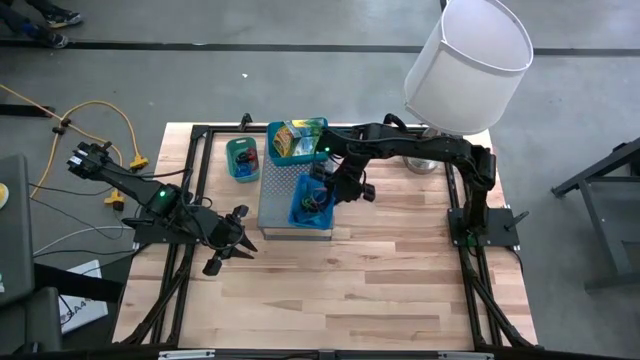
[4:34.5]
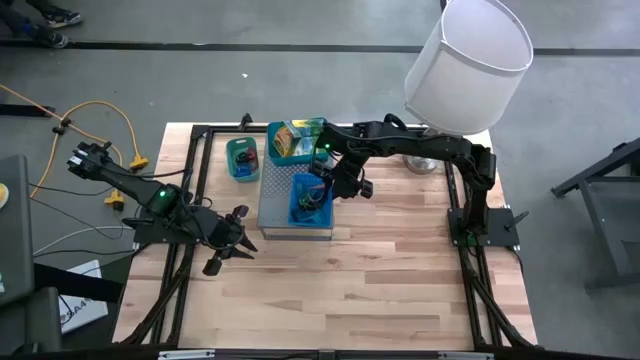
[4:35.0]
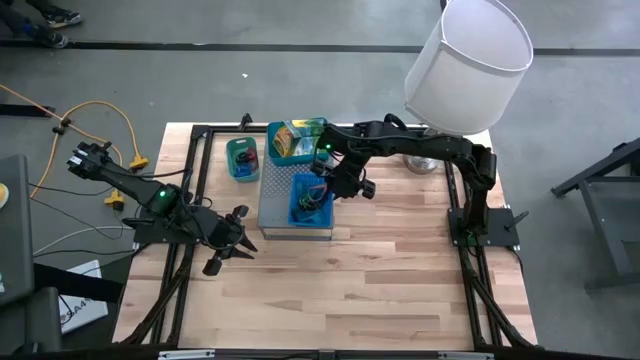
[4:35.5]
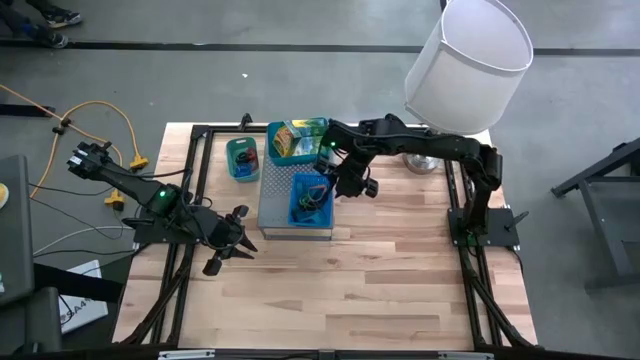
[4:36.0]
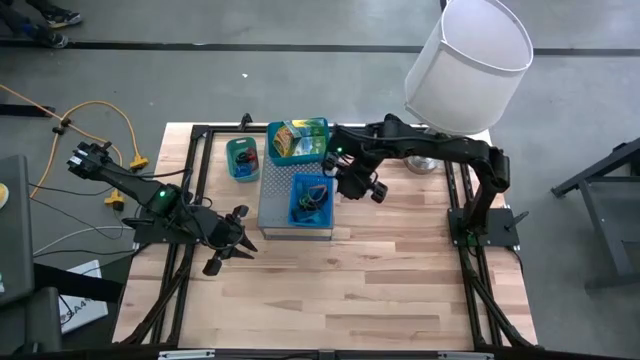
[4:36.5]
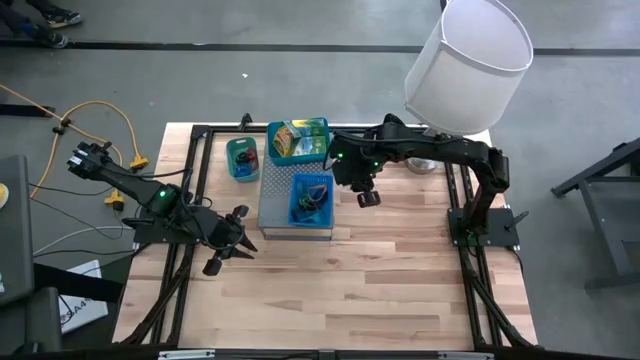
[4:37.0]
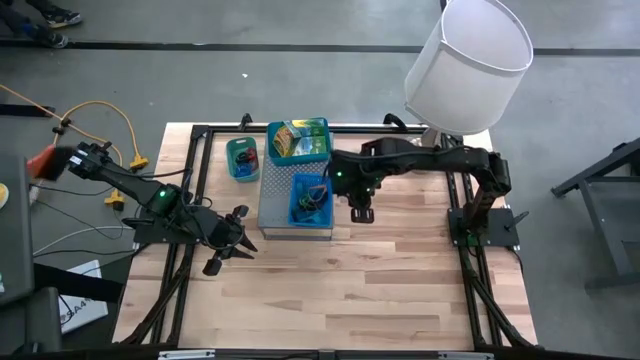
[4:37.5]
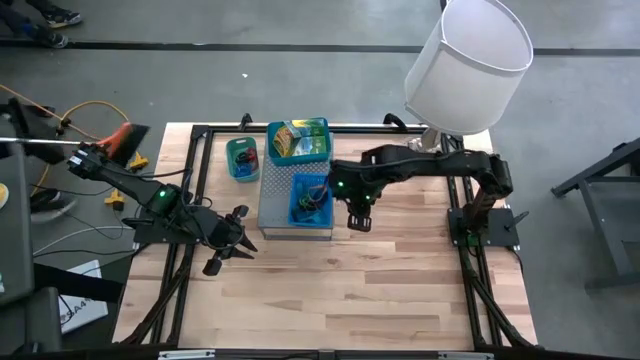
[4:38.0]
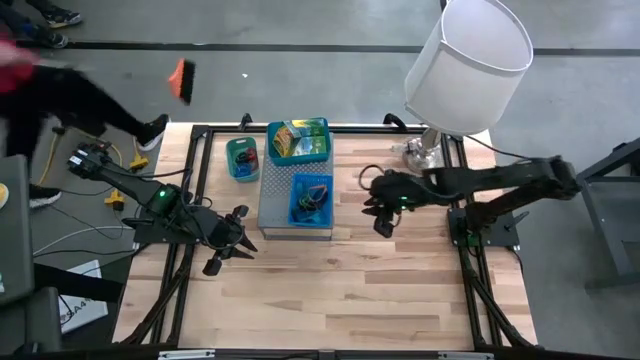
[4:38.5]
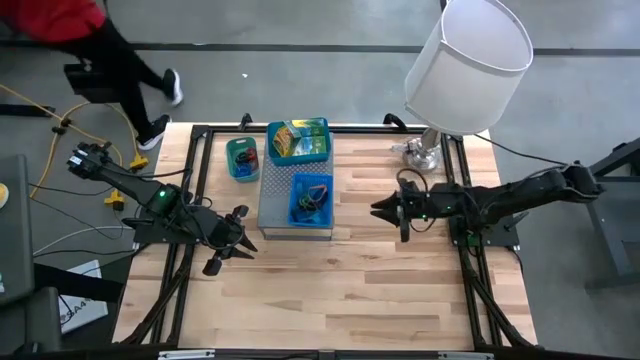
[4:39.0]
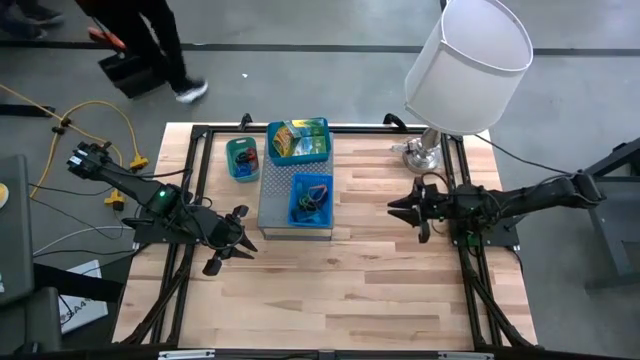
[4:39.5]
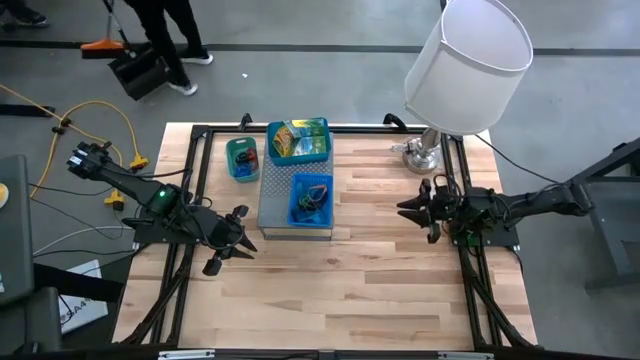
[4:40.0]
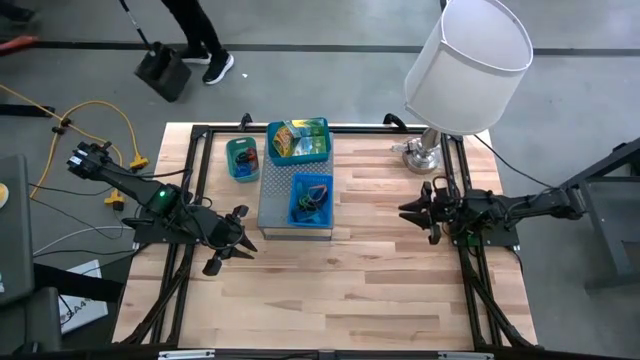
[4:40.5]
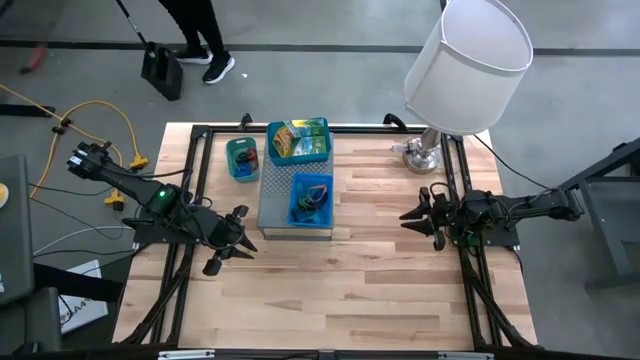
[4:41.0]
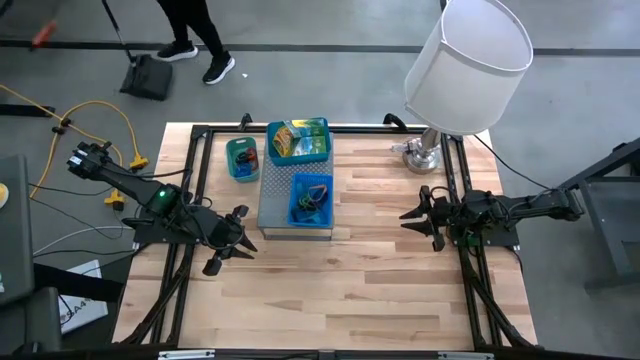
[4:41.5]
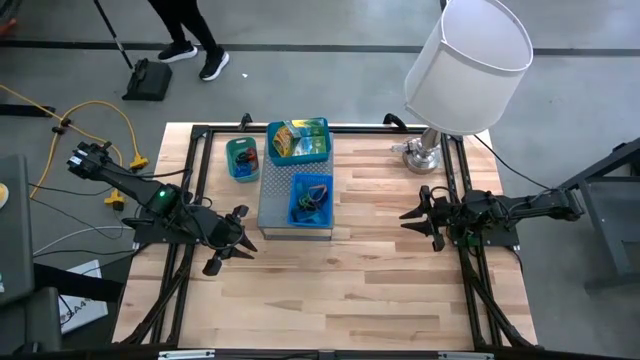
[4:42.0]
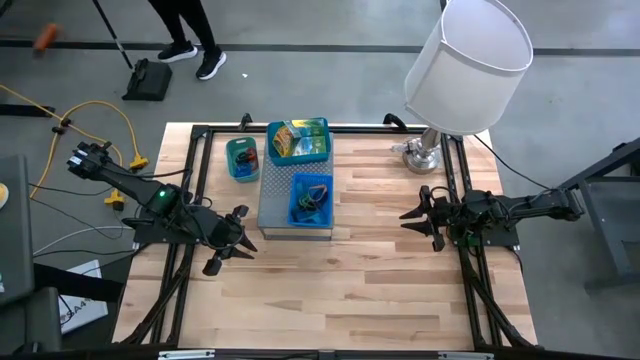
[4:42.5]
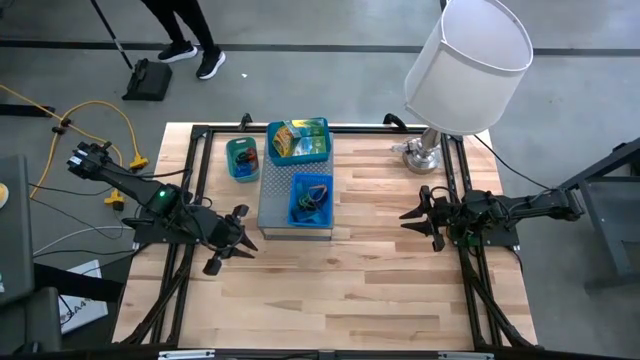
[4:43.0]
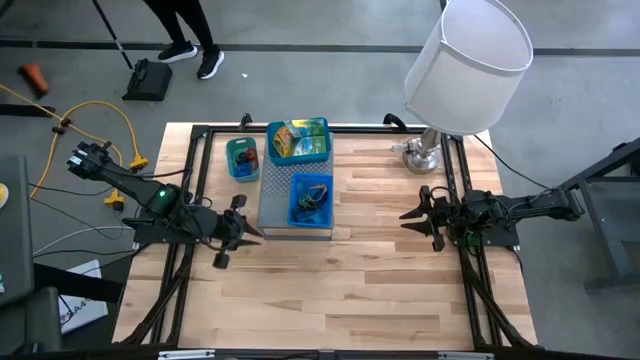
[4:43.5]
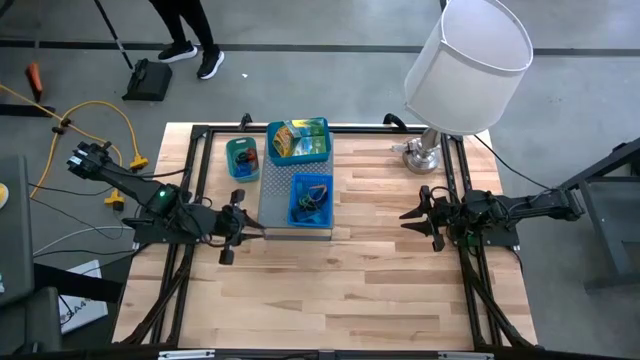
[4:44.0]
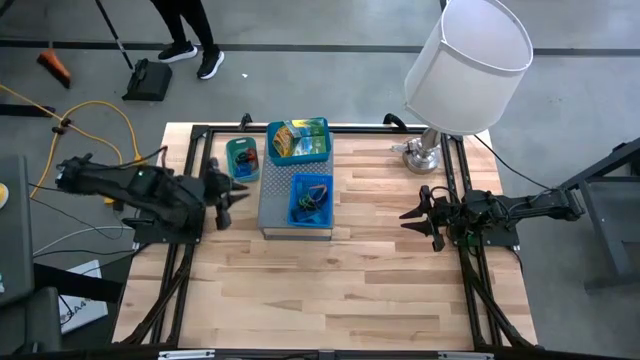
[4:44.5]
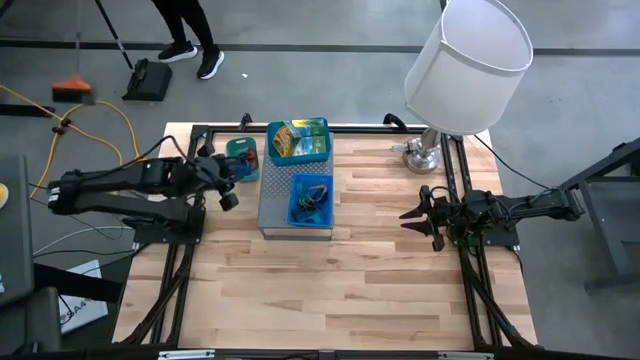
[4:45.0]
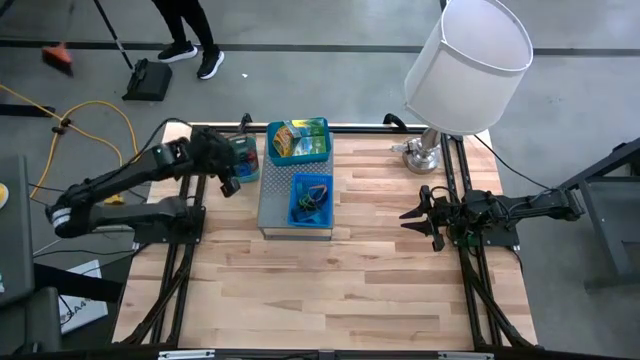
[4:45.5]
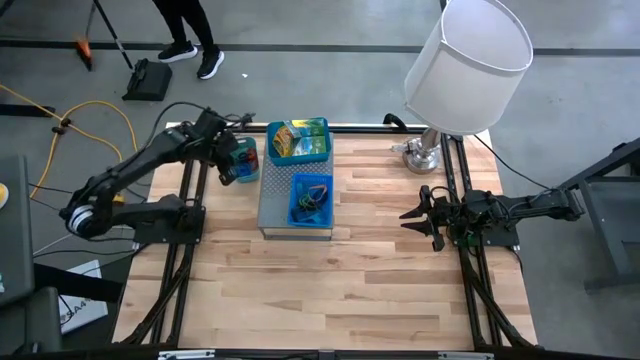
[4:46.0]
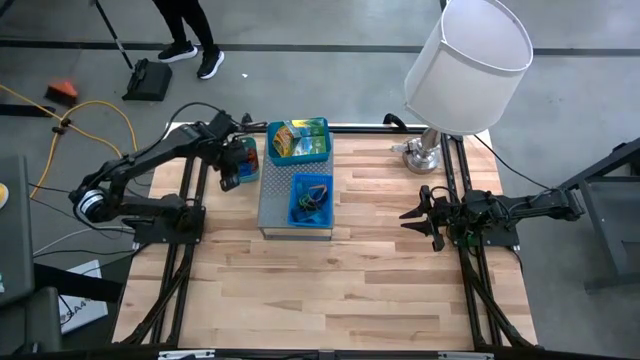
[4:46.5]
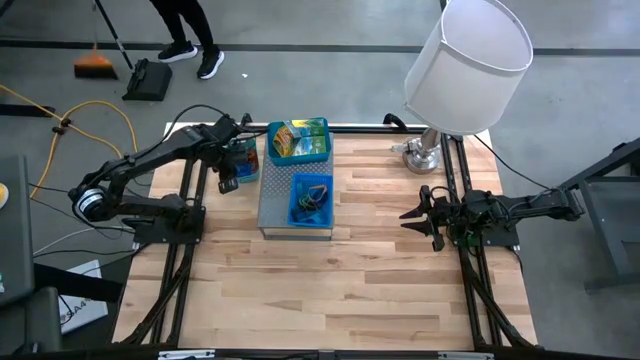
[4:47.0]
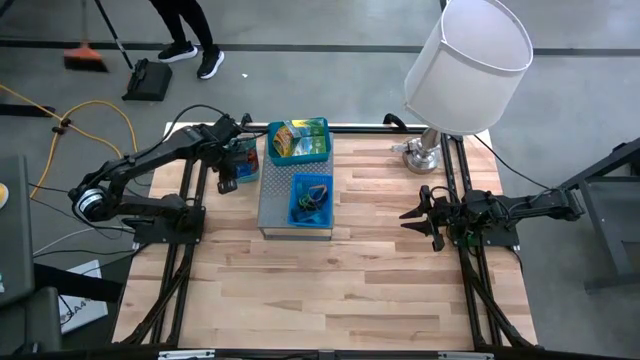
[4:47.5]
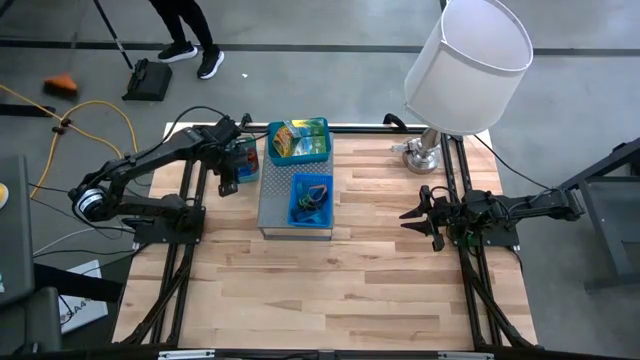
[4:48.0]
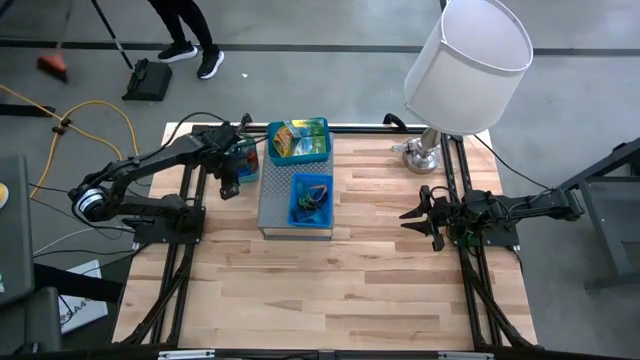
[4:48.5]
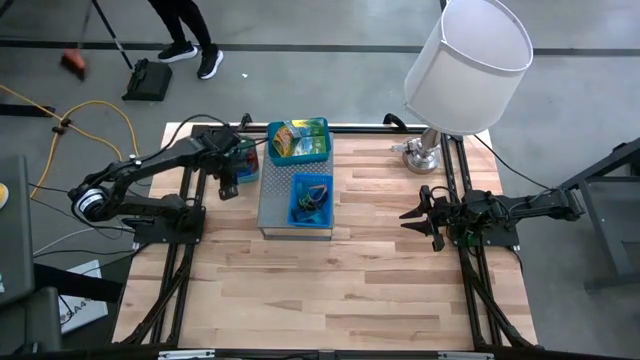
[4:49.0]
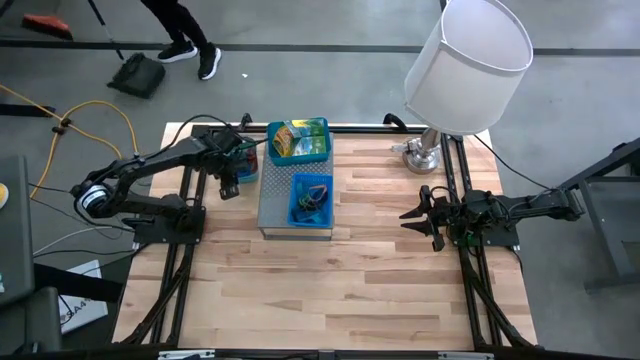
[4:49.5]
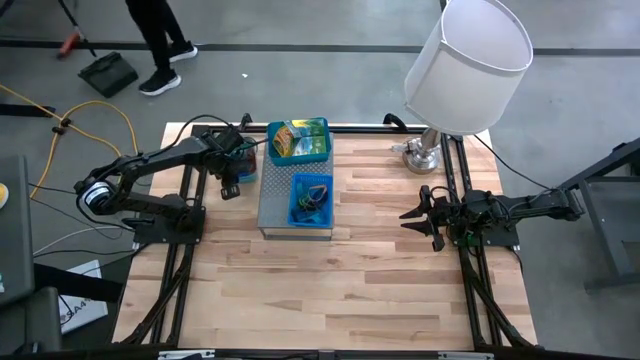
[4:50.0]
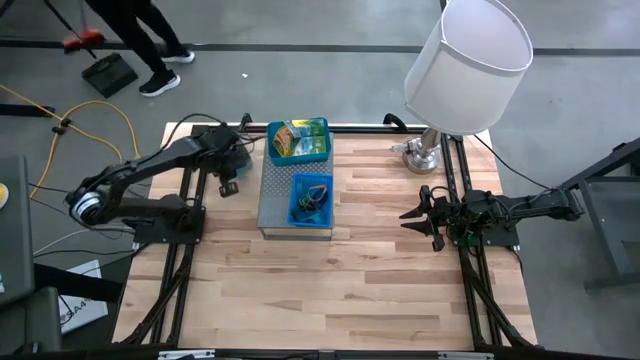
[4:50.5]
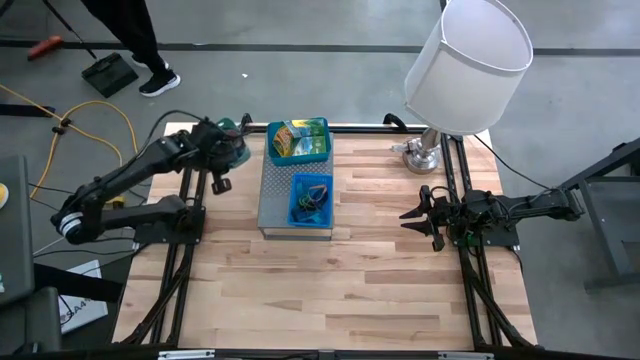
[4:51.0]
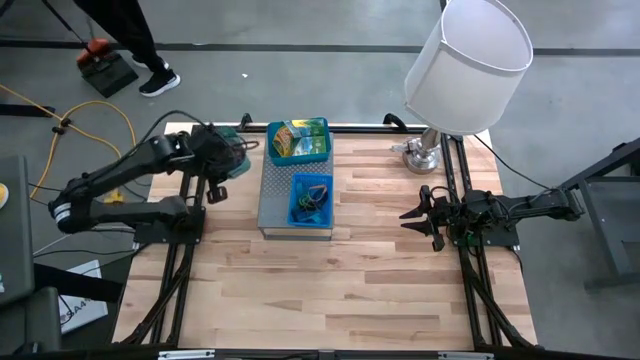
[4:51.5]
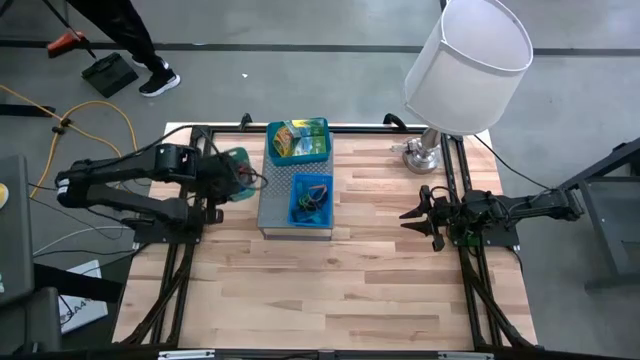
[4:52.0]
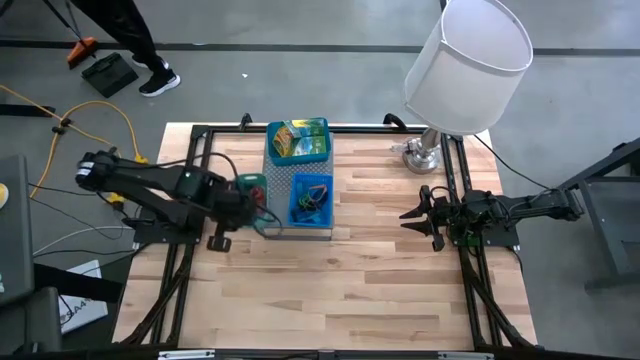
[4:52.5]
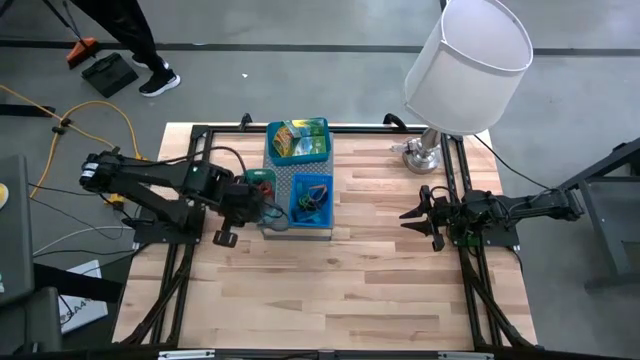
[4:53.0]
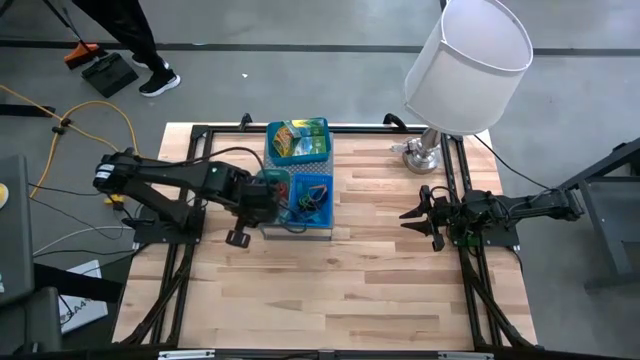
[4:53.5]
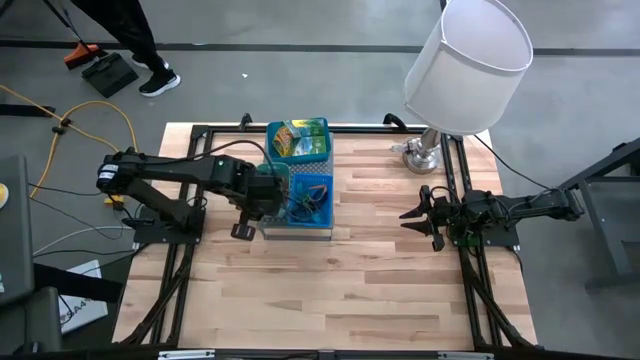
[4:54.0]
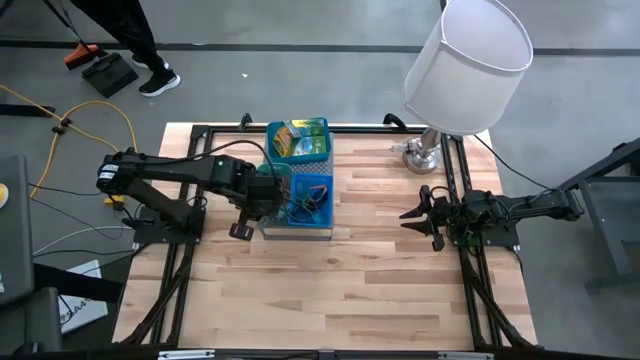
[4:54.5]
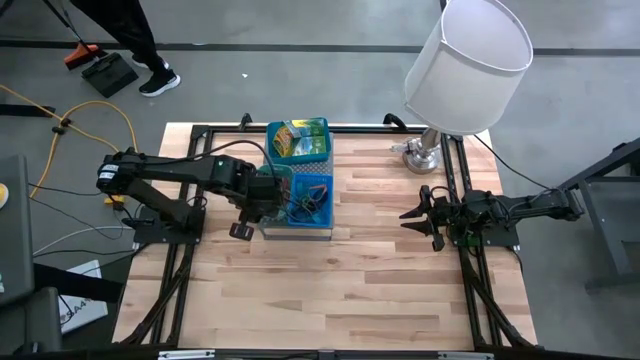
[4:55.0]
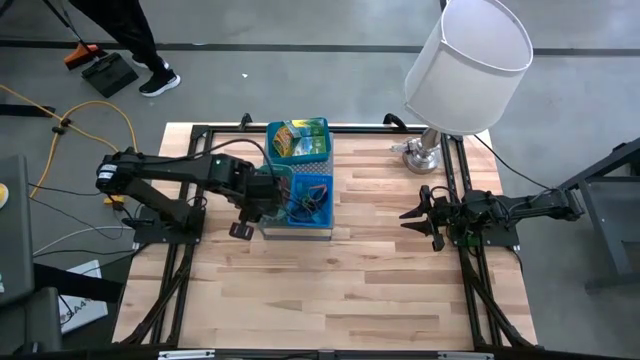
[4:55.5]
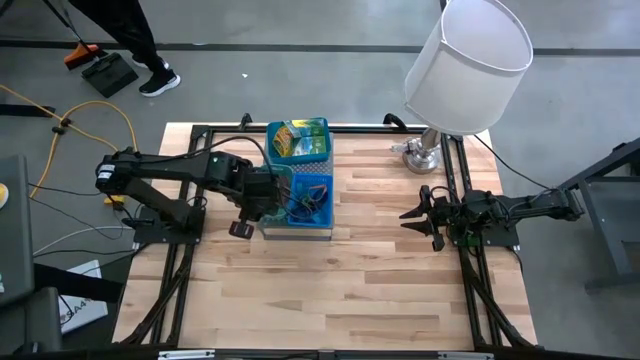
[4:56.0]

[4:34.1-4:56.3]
Task: Pick & Place Office Desk Supplies
Put the dark green bin with spring keychains on the shelf
